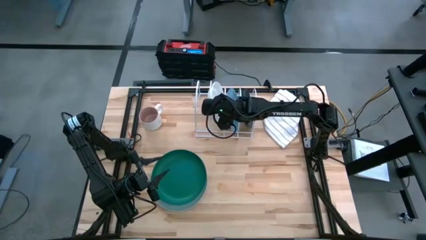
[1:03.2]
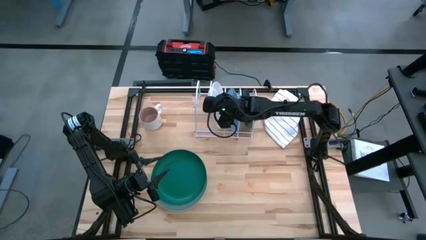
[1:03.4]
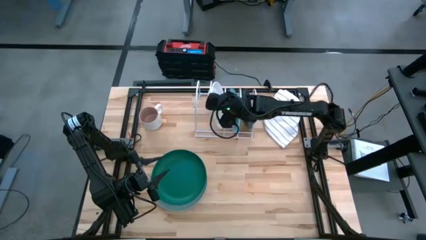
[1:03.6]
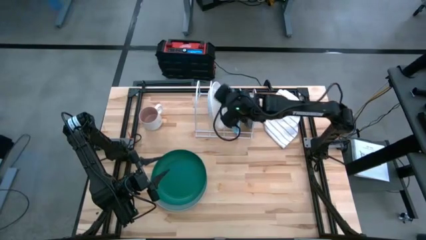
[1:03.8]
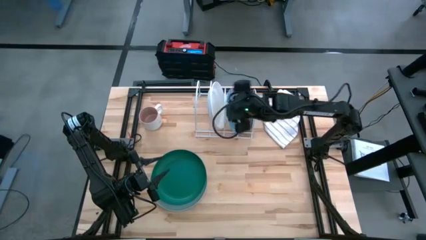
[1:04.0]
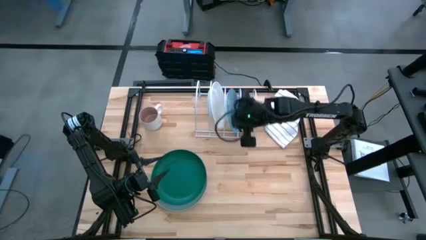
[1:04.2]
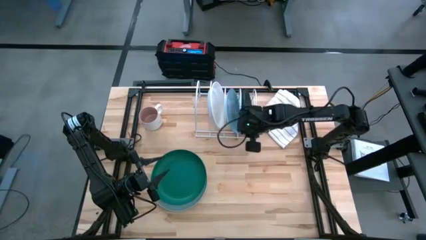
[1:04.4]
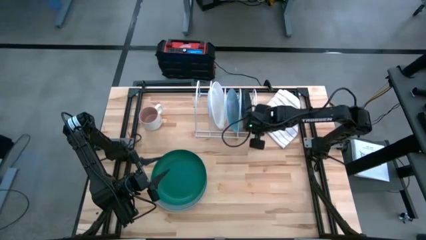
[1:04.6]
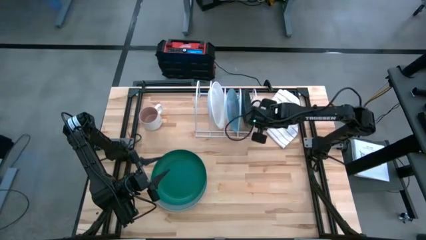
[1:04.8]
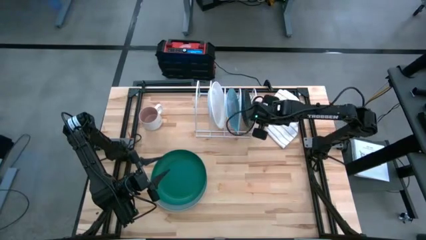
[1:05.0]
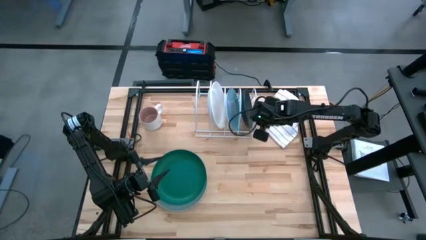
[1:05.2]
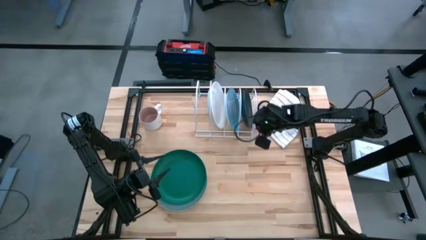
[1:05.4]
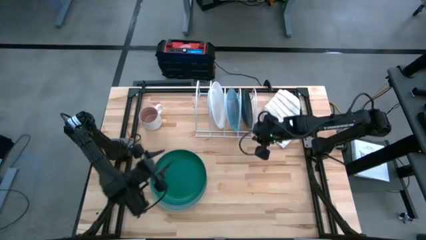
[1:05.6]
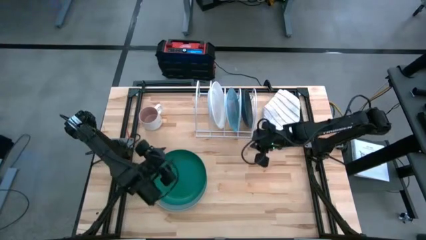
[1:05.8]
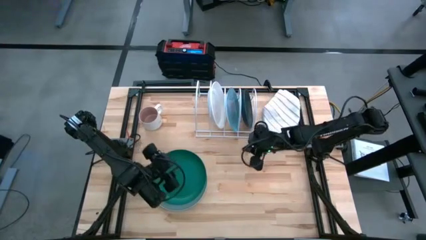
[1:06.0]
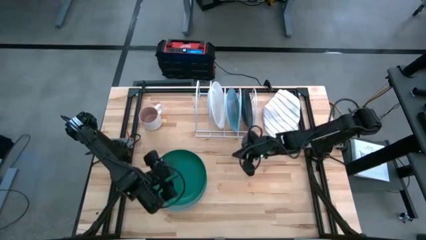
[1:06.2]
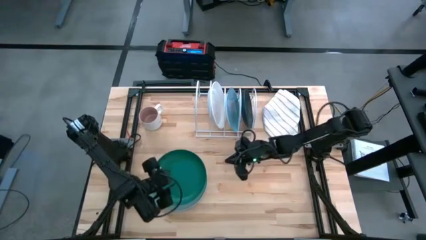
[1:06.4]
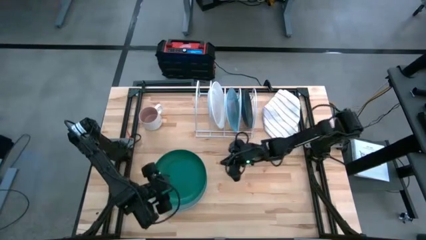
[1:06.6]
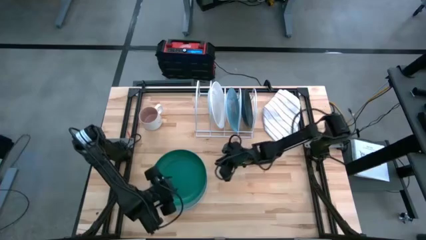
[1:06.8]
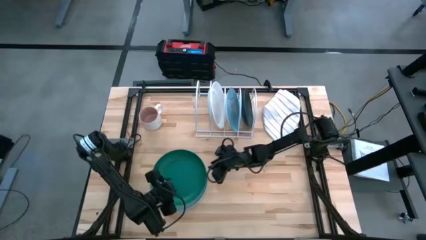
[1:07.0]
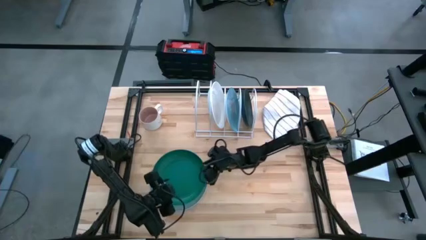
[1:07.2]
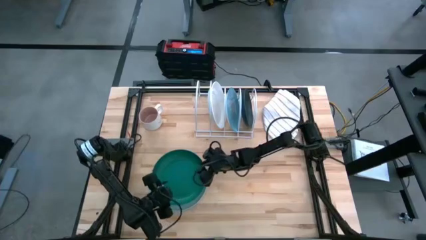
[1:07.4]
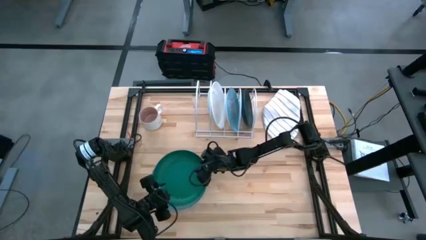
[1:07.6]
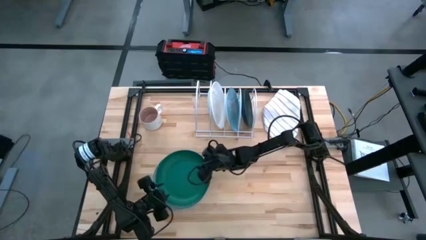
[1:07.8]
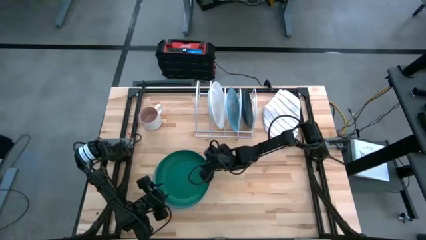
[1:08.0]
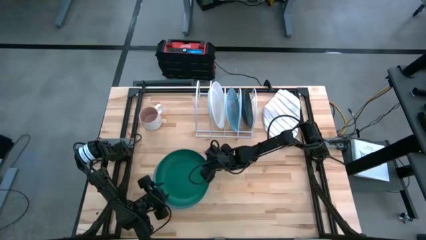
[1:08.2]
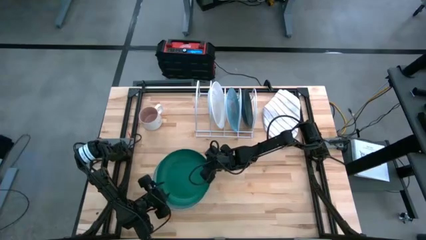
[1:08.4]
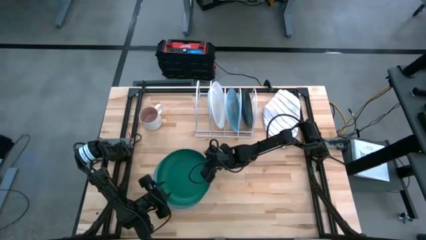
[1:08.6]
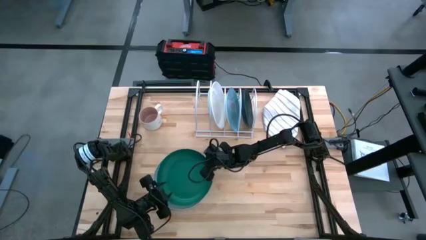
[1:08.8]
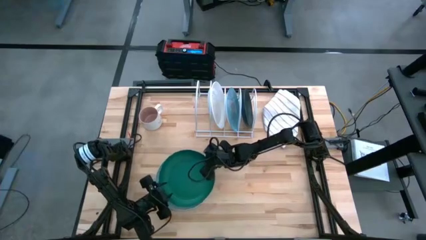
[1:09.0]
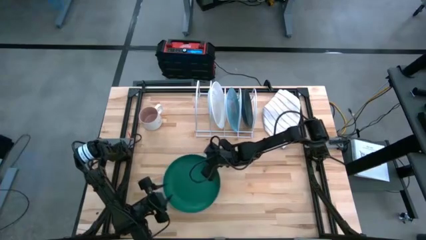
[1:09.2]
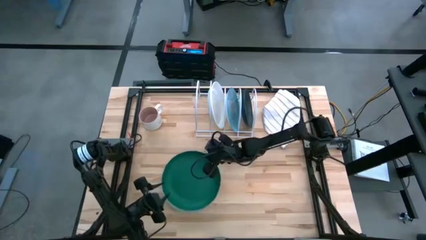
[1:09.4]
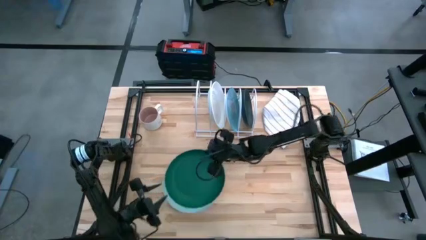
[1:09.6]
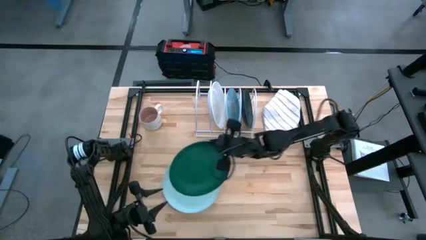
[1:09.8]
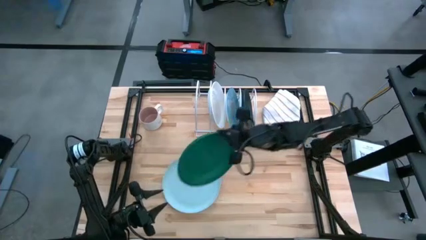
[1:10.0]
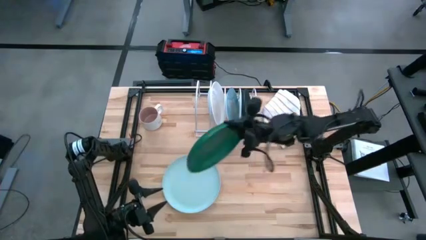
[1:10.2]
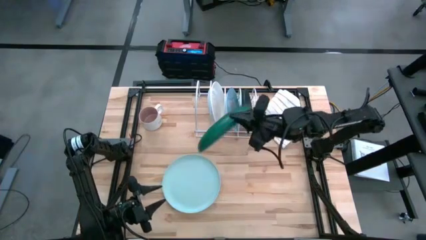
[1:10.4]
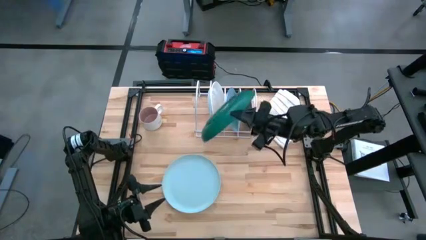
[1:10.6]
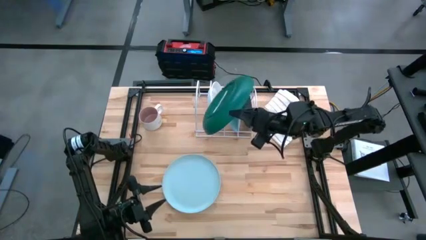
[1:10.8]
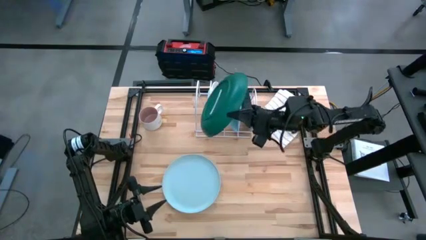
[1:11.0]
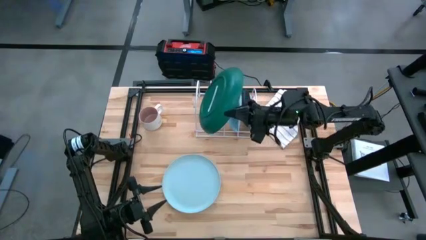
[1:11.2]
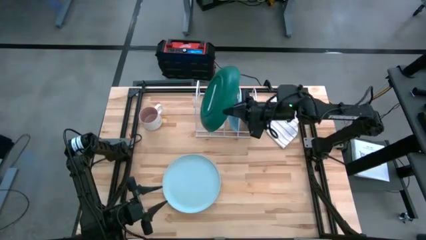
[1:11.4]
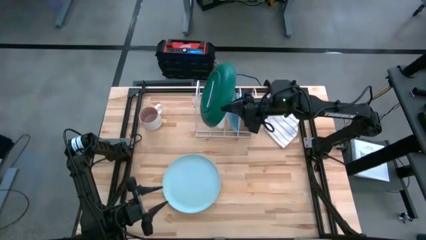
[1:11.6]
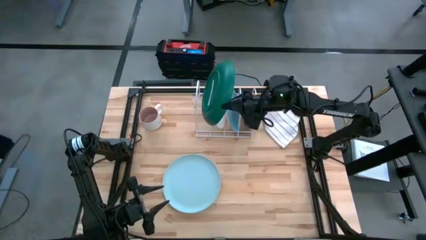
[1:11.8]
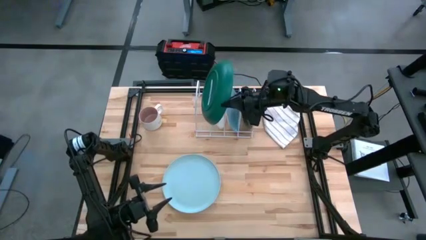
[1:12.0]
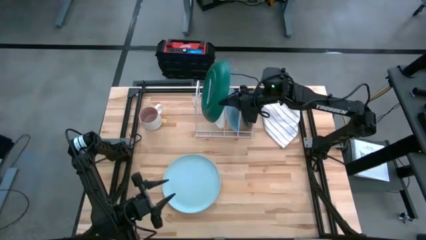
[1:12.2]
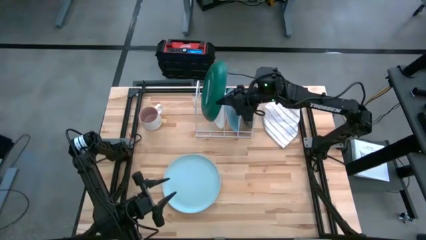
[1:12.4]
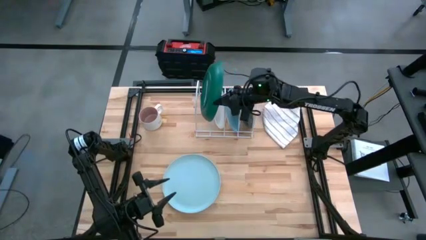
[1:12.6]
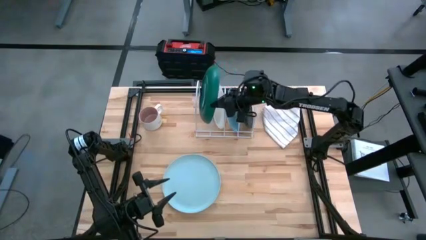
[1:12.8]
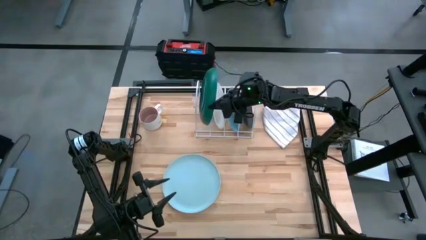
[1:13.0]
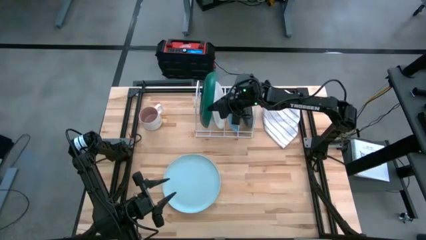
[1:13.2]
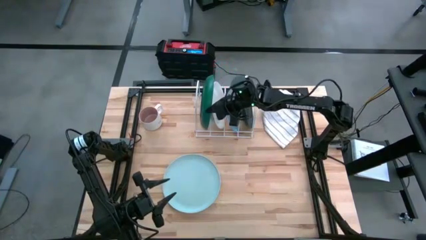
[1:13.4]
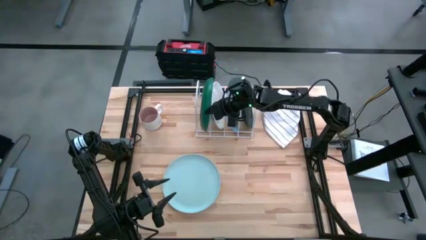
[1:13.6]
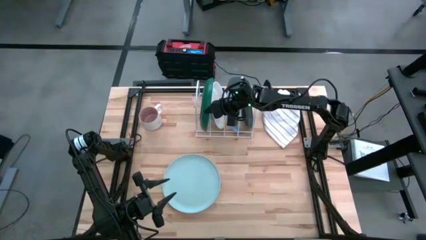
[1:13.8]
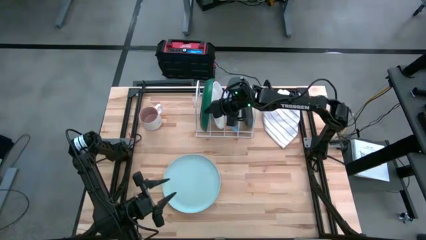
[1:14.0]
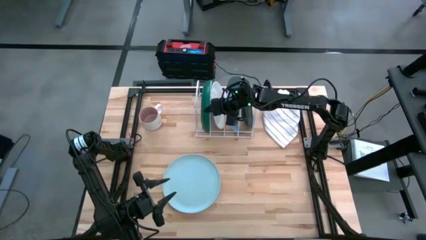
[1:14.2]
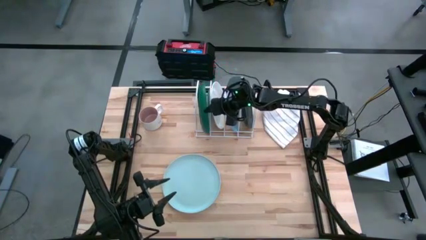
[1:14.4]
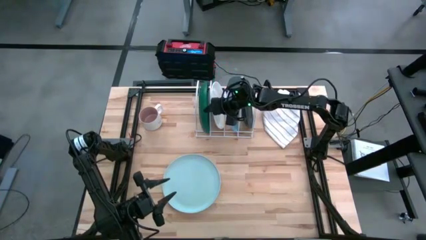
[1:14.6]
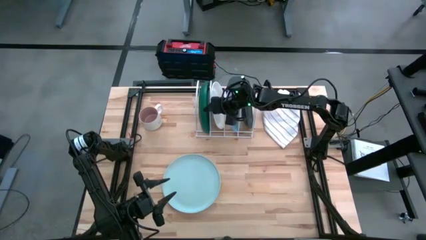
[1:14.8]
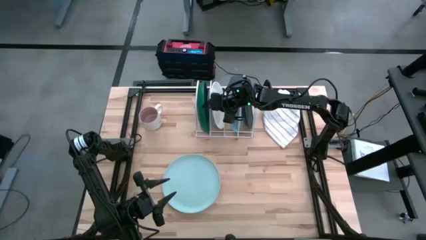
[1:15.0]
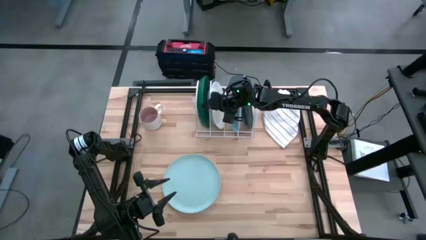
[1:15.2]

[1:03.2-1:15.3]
Task: Sort dishes
Put the green plate in the dishwasher rack

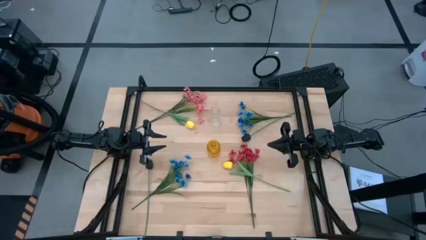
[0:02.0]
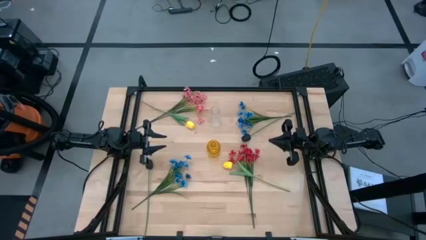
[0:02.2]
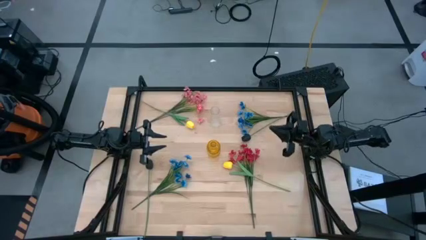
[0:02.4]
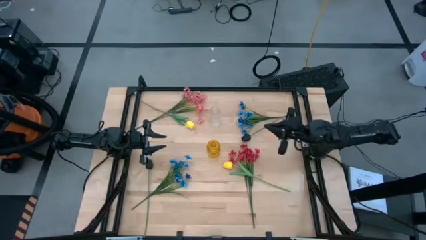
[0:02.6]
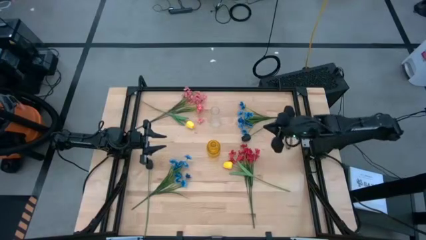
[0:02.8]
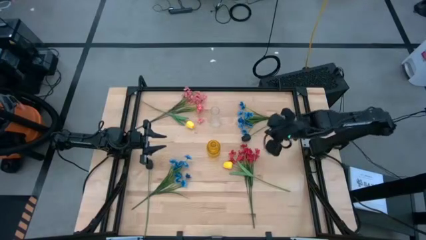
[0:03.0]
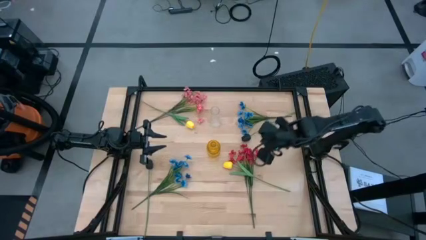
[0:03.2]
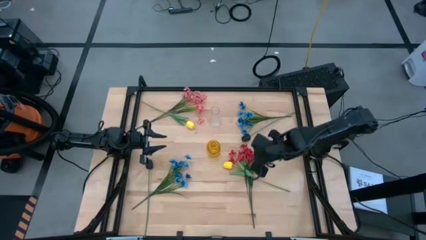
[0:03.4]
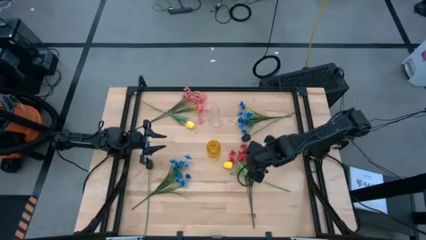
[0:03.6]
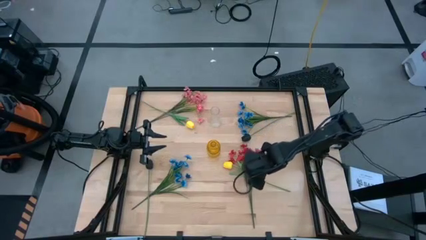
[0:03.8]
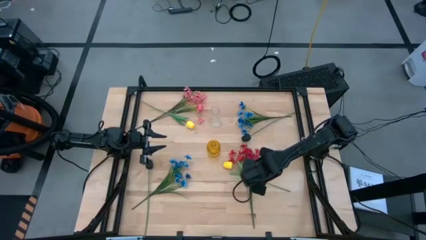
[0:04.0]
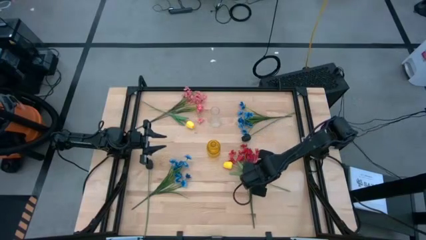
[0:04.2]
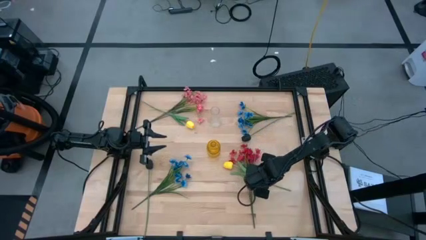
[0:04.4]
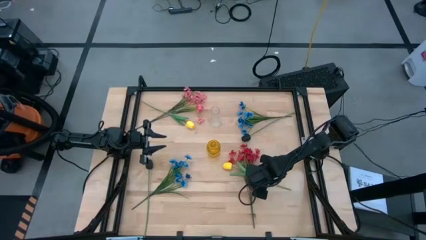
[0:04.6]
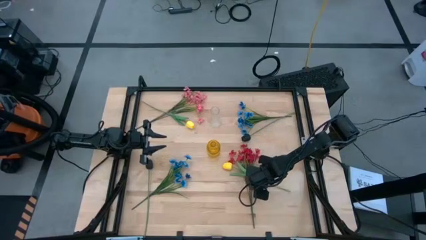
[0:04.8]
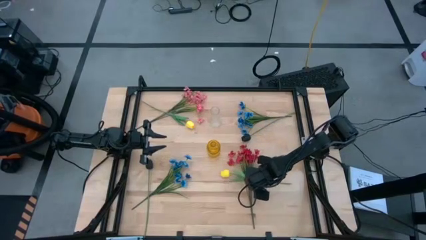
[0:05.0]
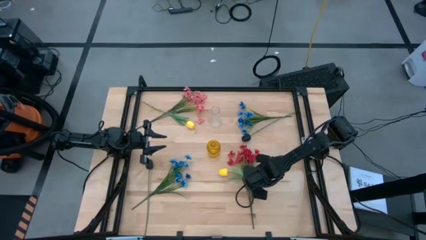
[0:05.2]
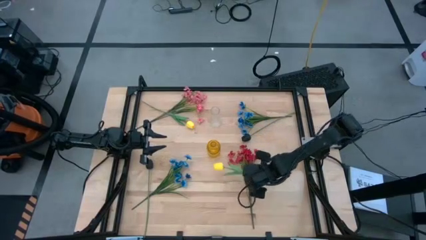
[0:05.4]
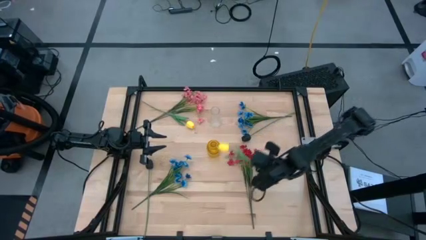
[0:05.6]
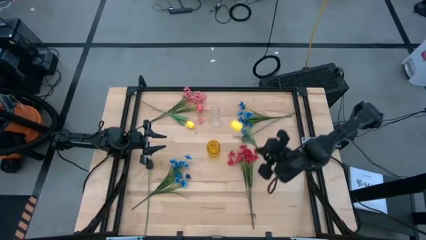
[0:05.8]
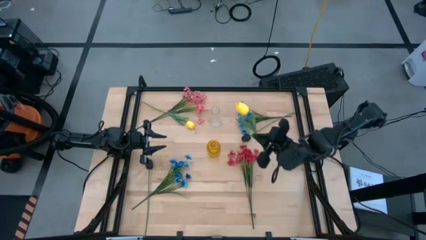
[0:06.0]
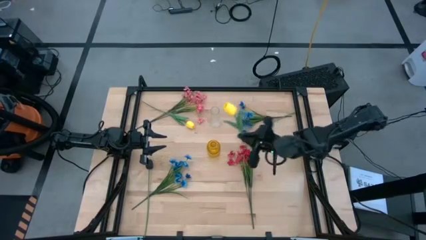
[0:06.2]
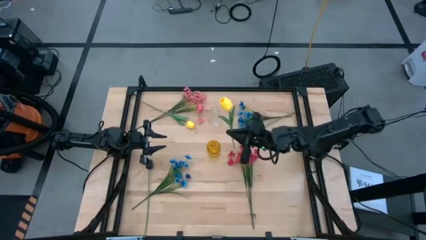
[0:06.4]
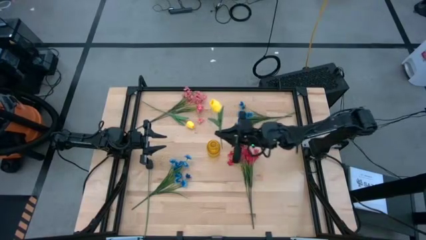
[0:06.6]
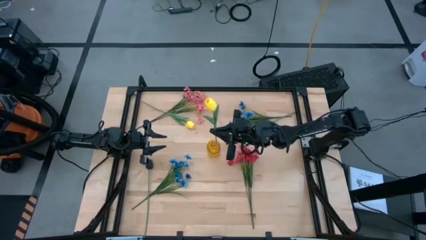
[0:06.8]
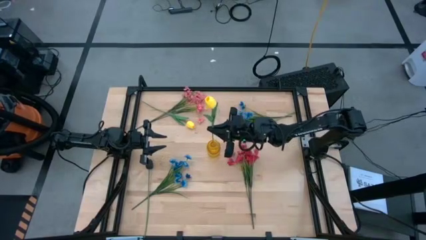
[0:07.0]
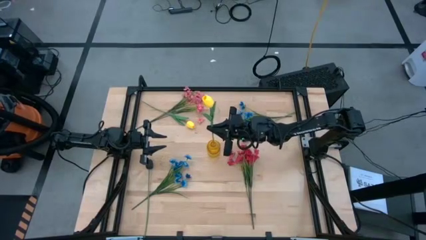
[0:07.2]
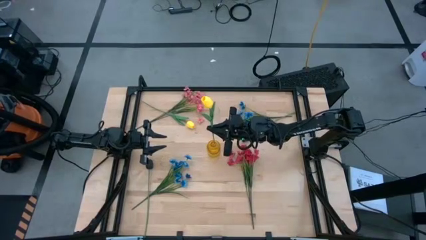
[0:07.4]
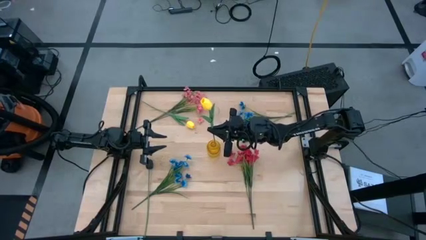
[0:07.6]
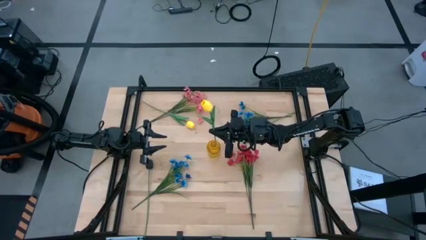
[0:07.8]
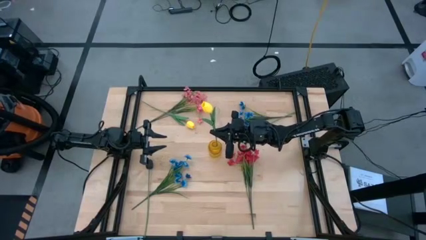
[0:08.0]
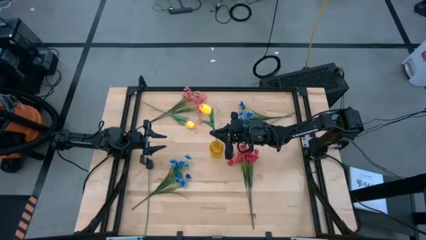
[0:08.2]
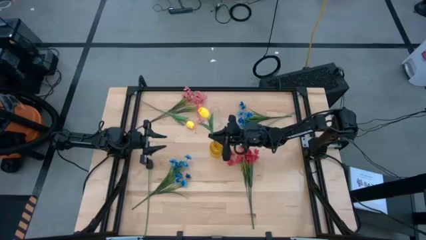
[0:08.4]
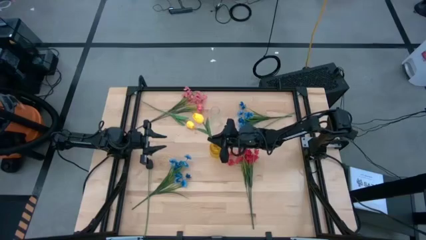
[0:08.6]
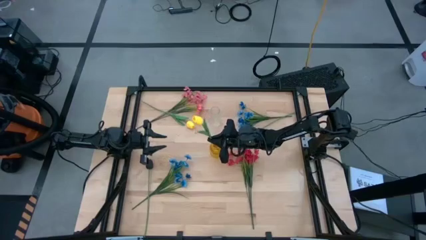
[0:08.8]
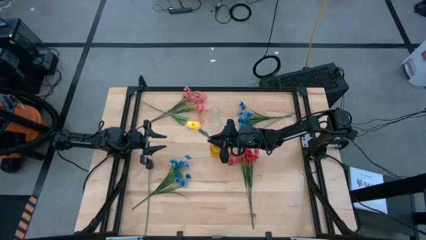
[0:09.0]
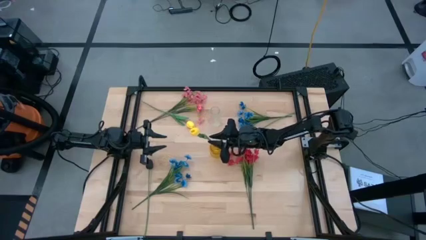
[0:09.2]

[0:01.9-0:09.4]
Task: Sort flowers into vase by color
Put the right yellow flower into the yellow flower vase
